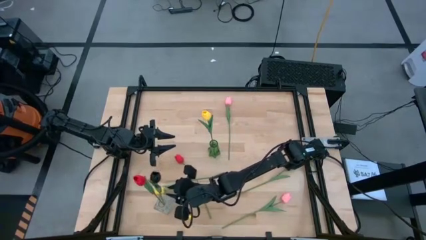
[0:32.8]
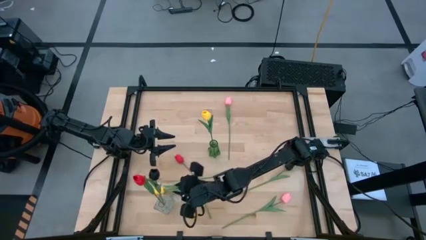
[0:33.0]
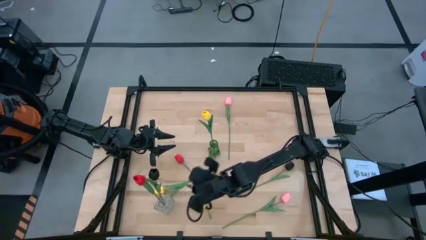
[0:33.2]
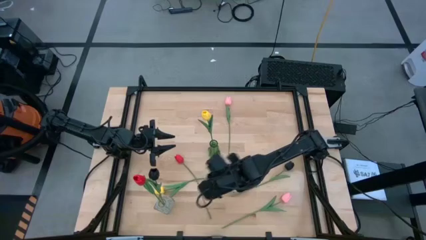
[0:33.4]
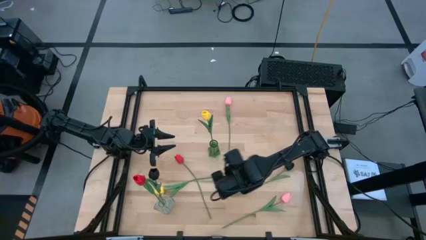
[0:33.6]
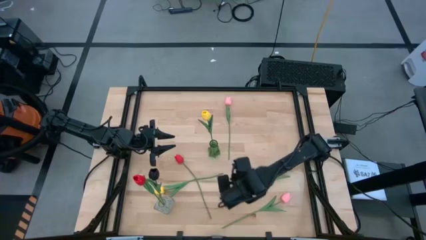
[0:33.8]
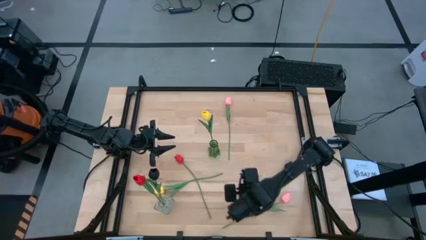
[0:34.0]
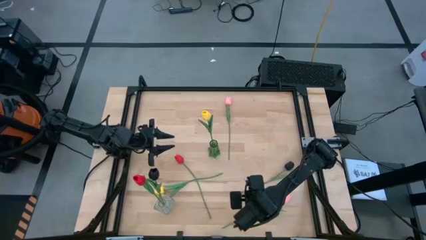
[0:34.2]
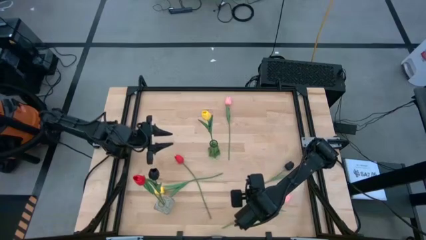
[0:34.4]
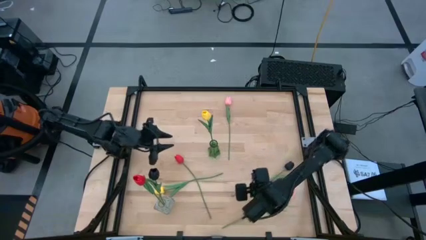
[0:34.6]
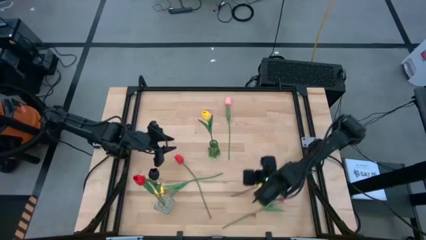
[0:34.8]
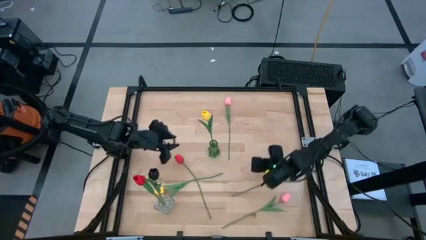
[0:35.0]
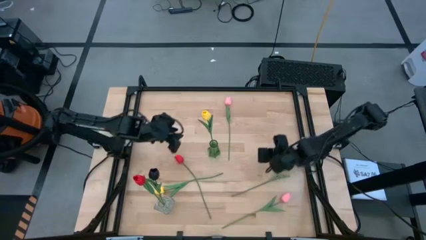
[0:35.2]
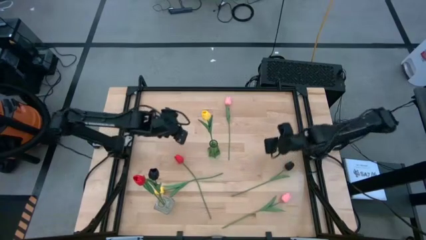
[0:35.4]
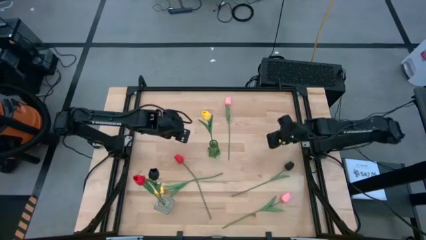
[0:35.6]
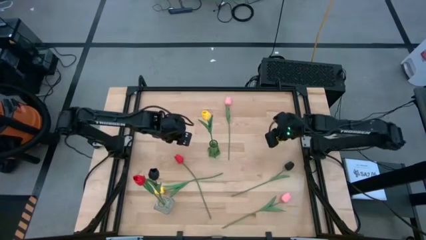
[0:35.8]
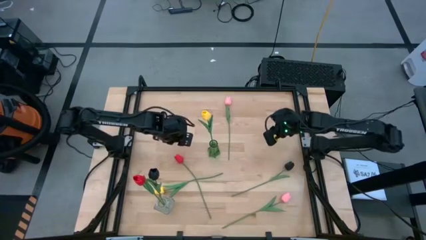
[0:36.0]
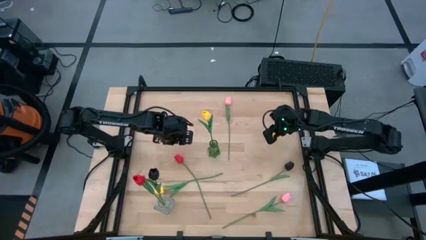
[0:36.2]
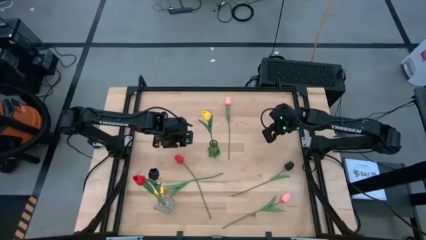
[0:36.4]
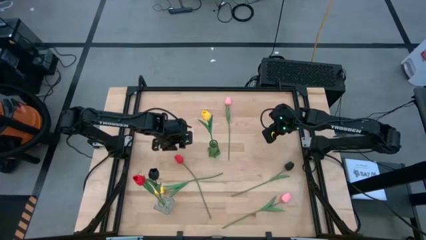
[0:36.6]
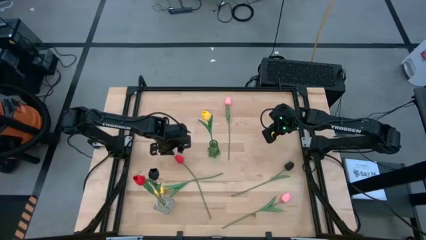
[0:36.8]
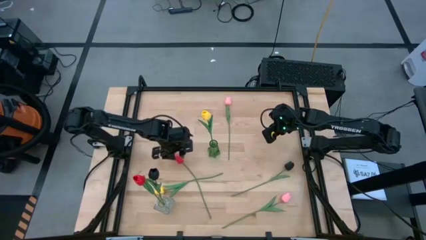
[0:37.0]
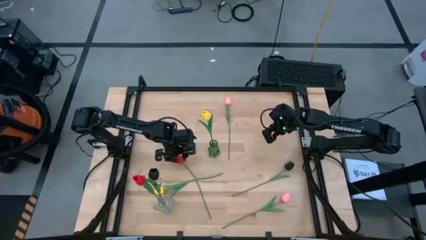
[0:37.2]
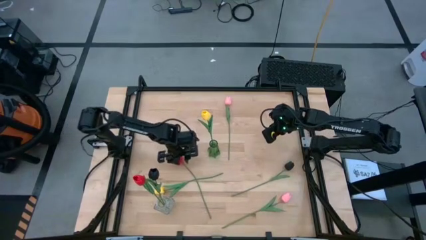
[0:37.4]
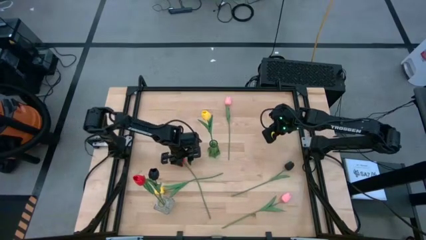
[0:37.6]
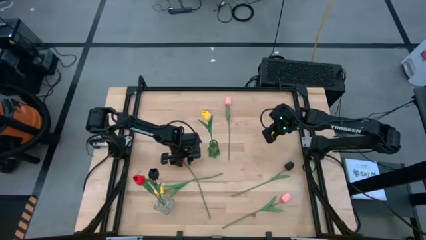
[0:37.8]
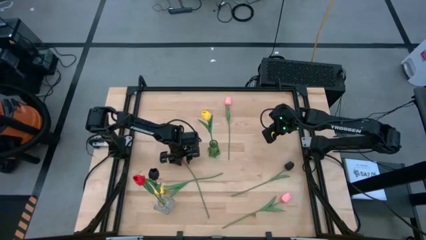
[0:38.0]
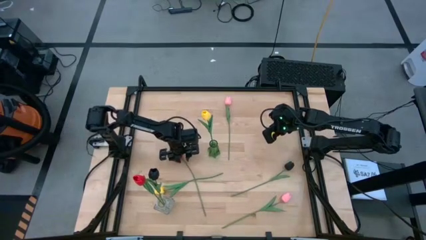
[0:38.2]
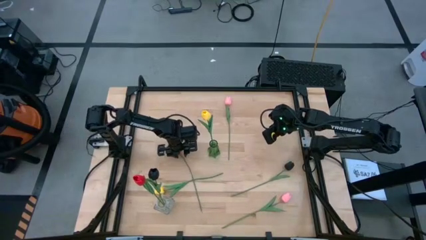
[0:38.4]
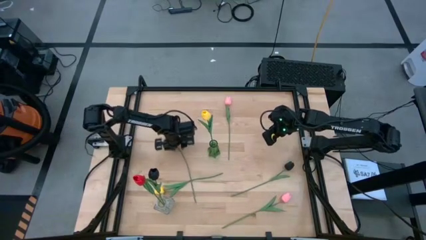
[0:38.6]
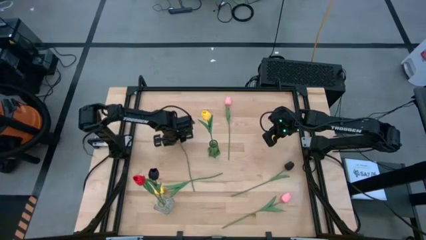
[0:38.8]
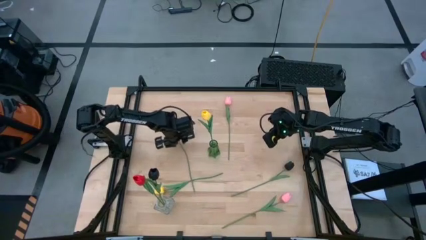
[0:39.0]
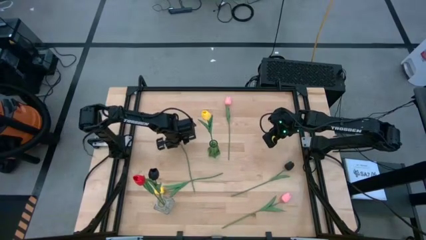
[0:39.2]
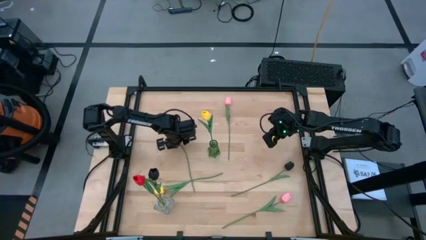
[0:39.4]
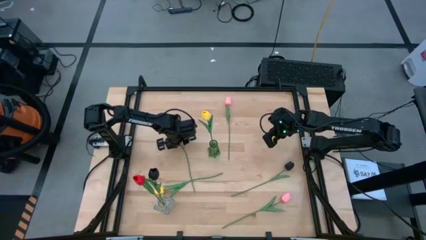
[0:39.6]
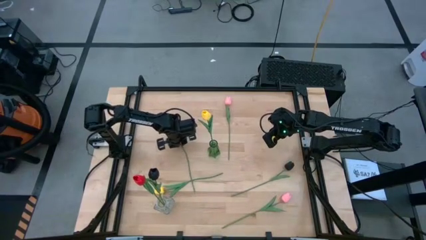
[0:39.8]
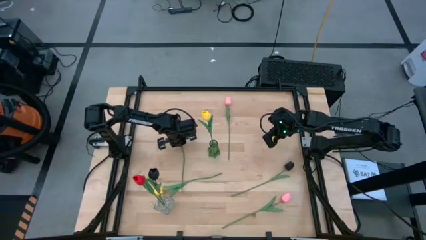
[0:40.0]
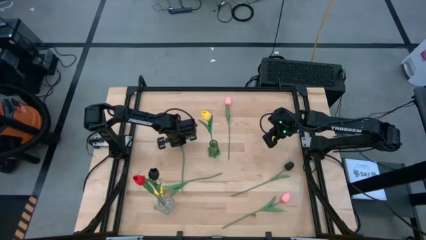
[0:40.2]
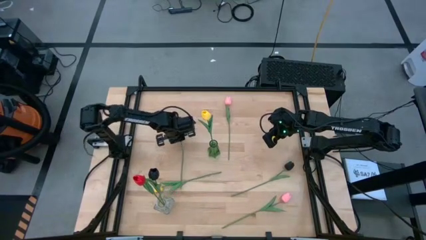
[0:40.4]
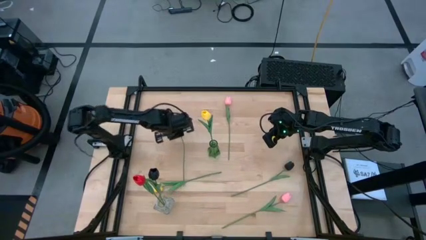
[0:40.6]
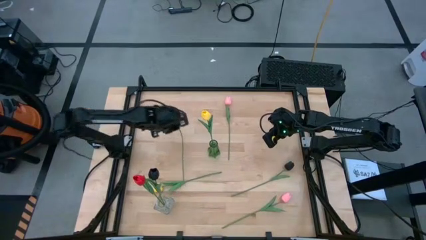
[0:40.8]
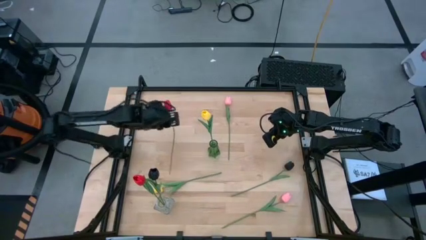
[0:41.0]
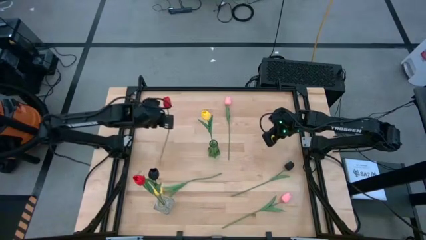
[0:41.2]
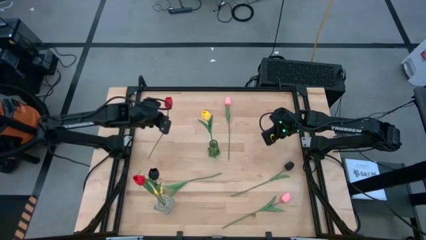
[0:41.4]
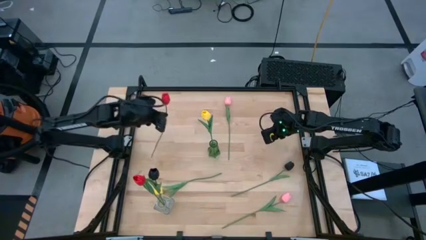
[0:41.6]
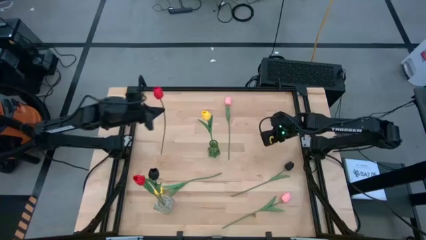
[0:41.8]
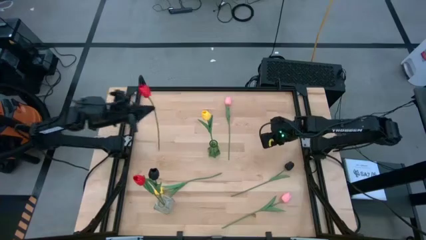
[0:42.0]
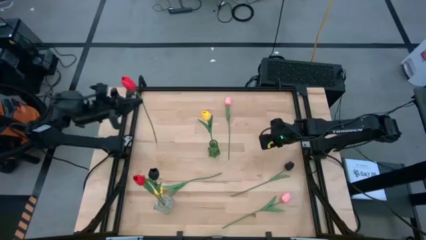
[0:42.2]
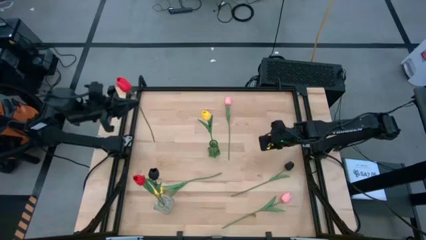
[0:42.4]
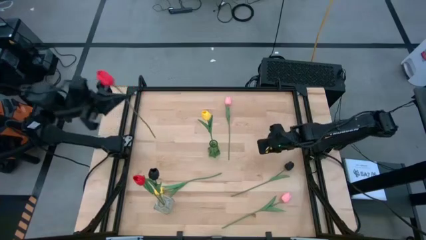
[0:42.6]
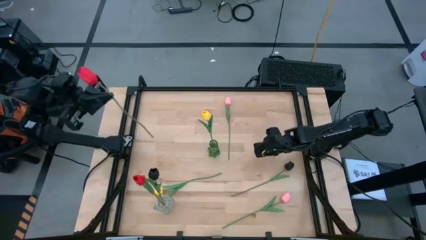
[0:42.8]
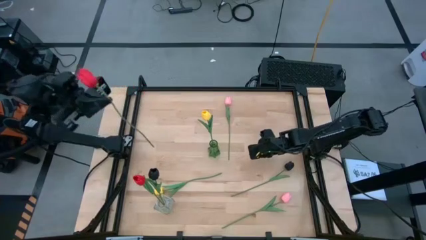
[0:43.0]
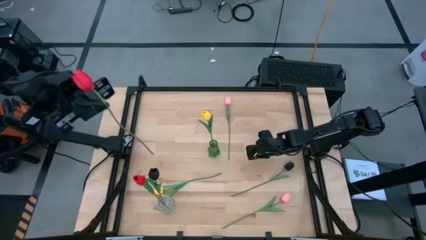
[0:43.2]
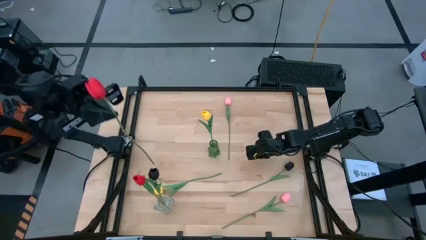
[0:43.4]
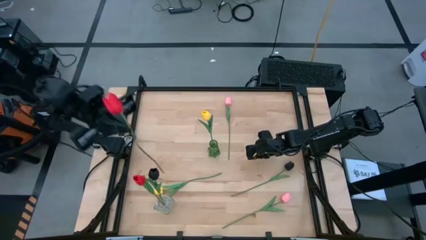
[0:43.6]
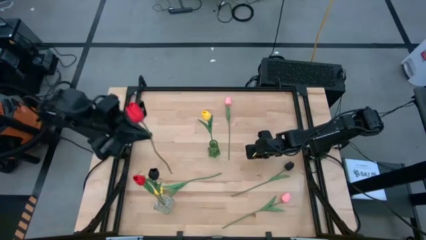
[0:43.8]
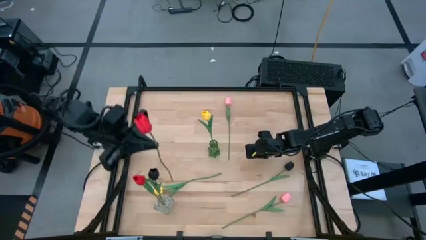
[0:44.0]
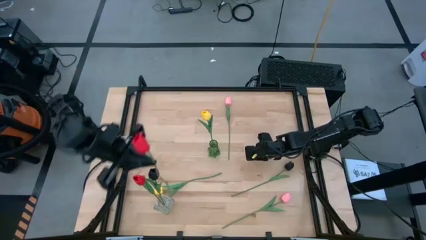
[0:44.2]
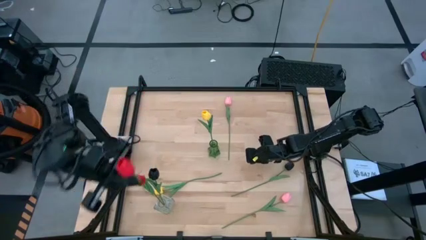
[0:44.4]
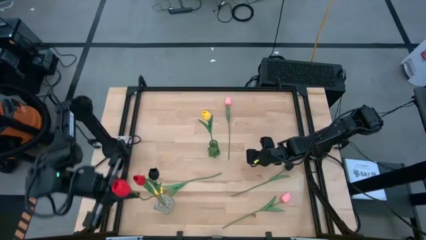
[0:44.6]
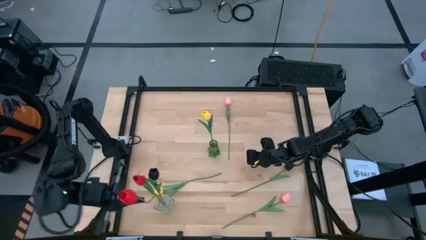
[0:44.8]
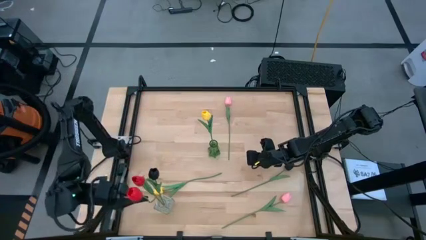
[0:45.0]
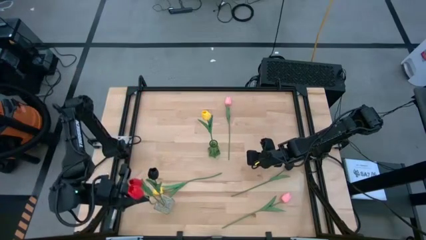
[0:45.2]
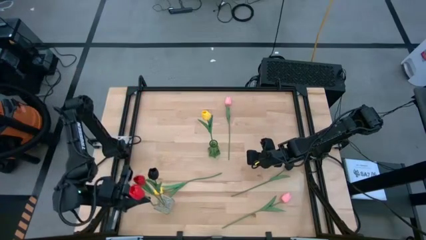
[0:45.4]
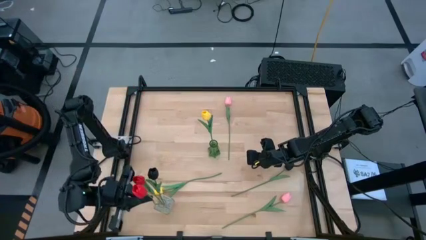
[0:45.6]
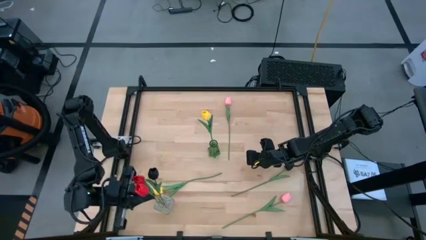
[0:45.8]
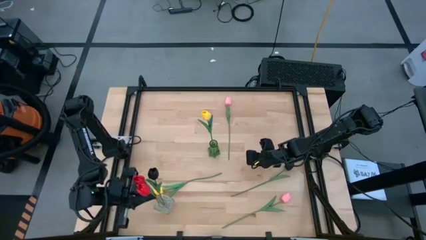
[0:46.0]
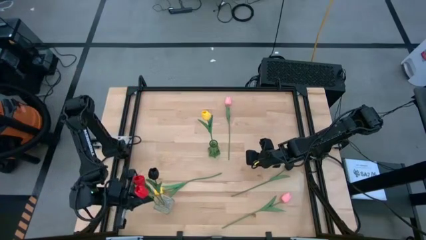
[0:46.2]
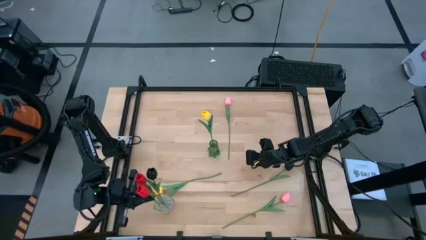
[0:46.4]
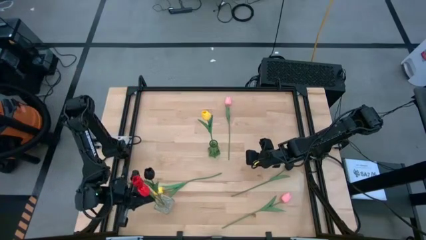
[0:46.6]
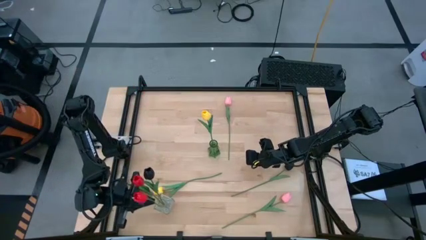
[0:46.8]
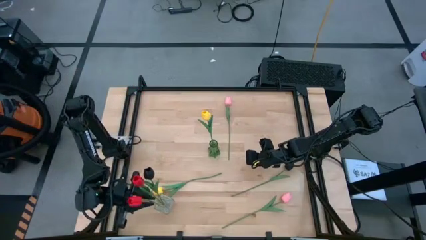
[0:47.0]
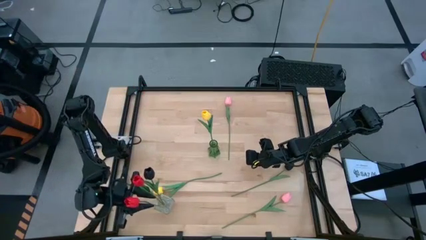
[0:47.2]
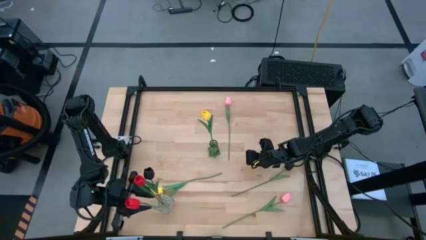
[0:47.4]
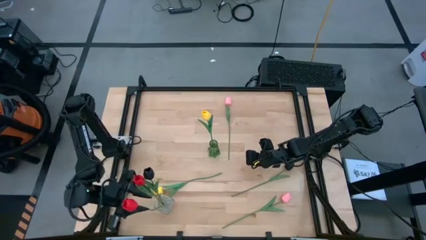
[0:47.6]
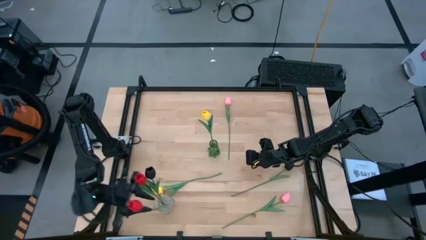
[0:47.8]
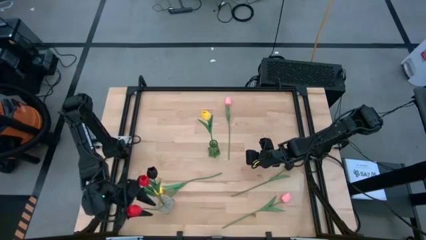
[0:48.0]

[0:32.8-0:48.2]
Task: Sort flowers into vase by color
Put the red tulip into the transparent vase

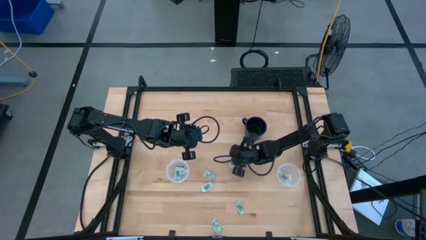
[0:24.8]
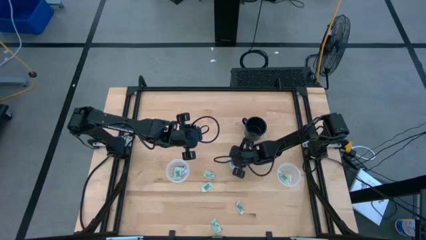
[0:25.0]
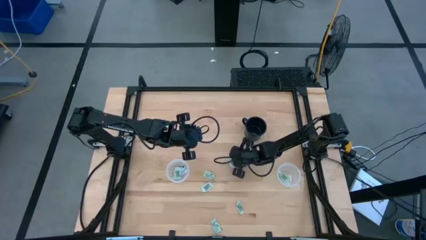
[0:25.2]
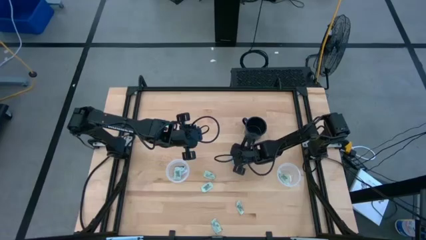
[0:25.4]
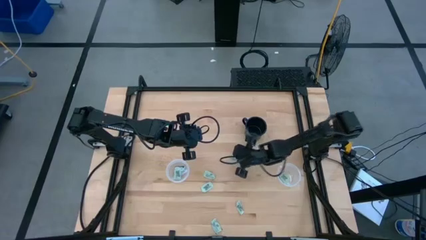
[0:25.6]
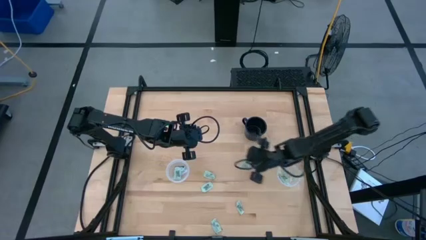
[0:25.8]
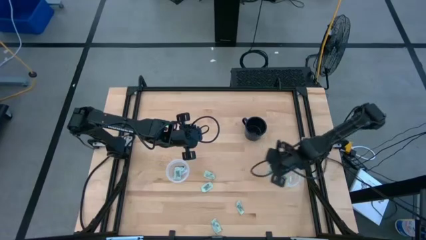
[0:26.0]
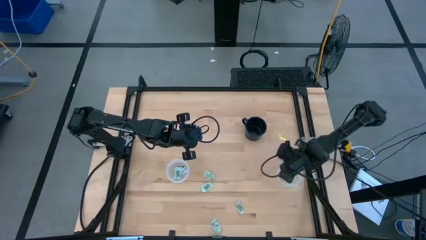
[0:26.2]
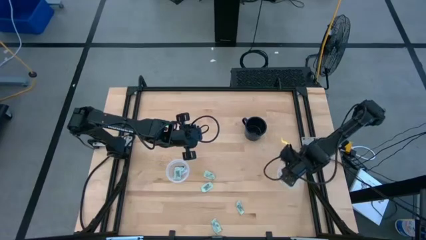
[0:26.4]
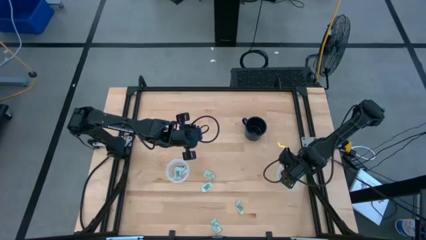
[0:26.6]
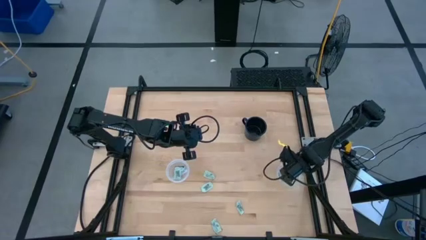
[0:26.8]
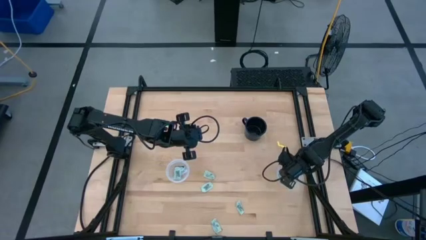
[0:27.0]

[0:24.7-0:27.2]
Task: Pick and place Stevia / Truvia into bins
Put the stevia packet into the right transparent plastic container

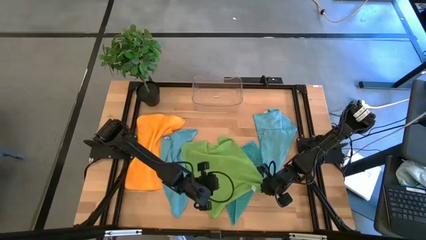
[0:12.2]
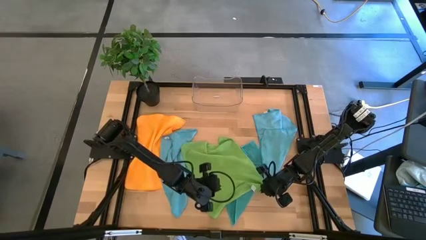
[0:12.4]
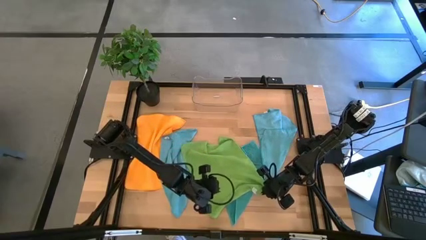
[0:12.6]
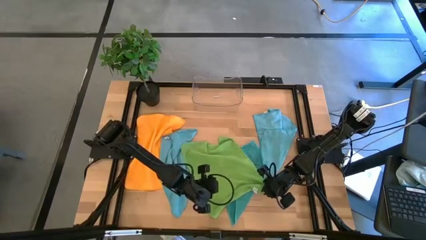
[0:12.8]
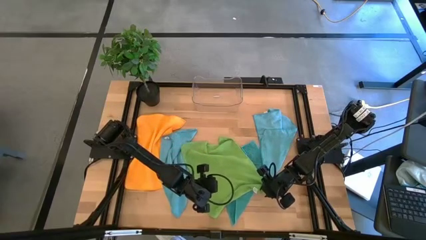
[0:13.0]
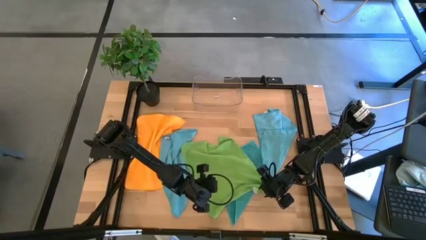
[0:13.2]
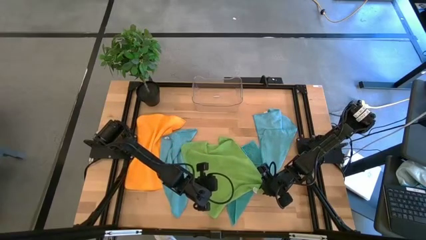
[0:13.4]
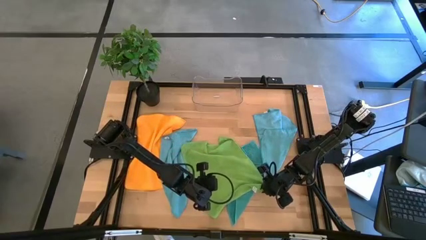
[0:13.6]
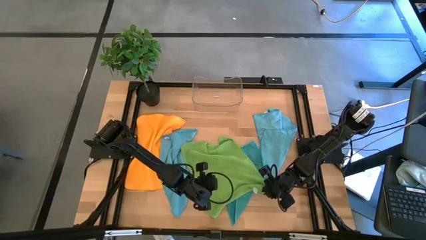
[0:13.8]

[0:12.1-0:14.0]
Task: Fold microfiber towels
Fold the green microfiber towel
